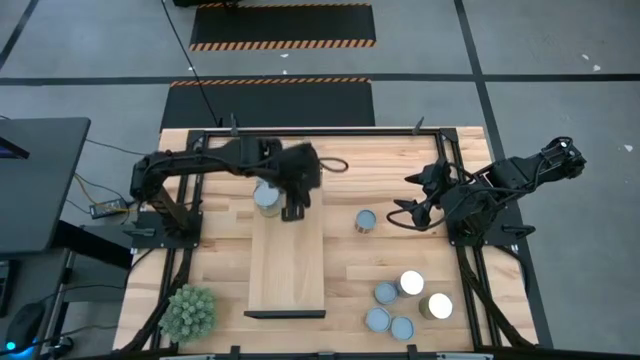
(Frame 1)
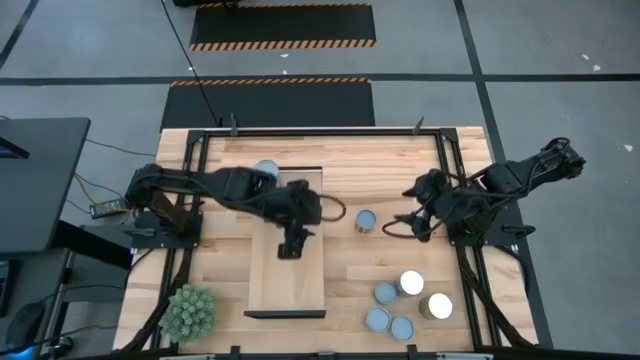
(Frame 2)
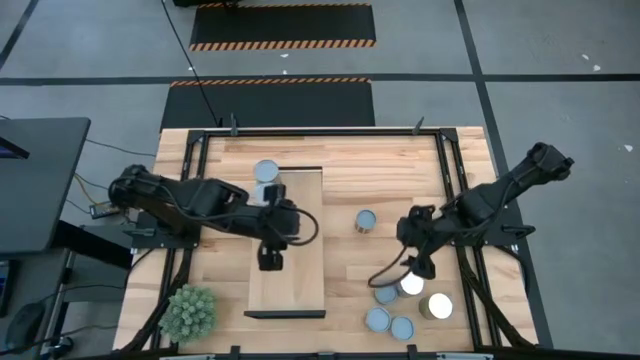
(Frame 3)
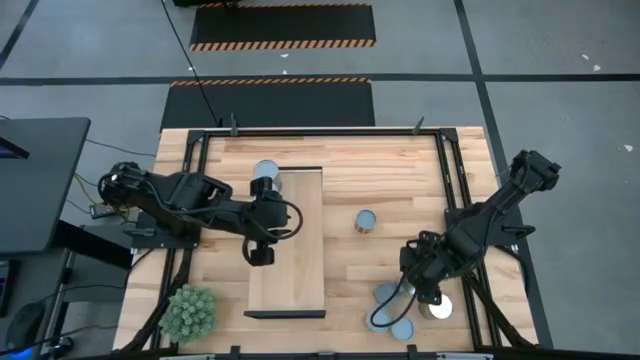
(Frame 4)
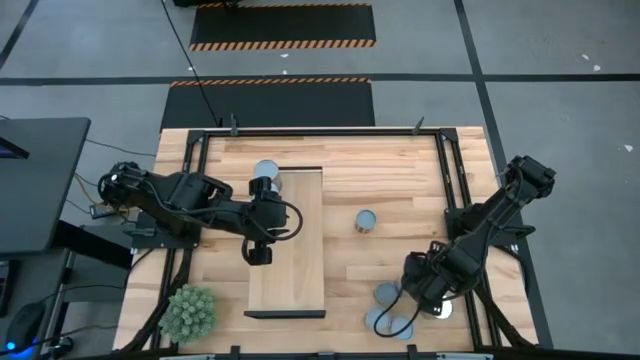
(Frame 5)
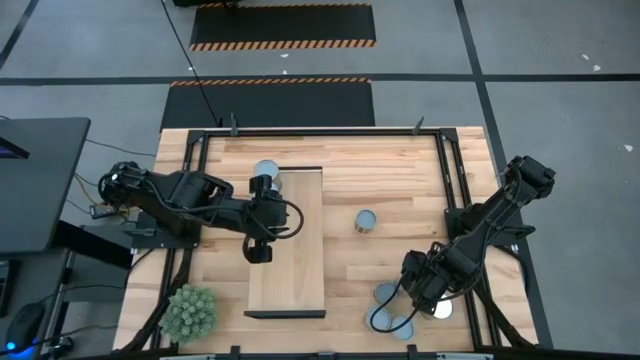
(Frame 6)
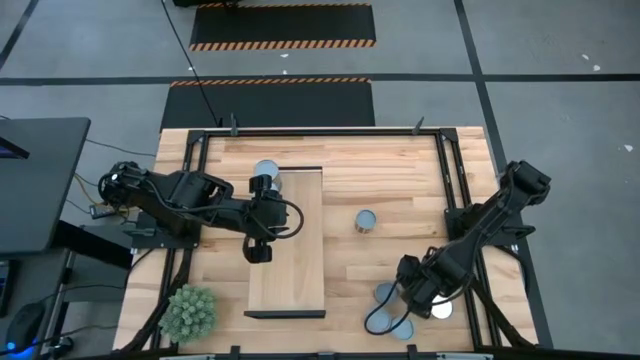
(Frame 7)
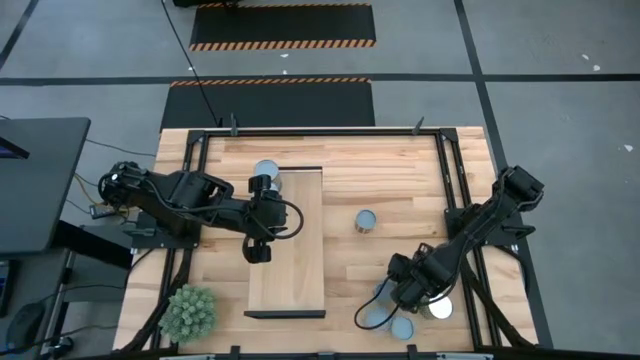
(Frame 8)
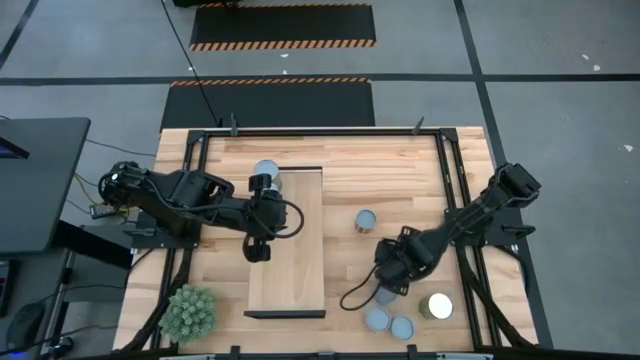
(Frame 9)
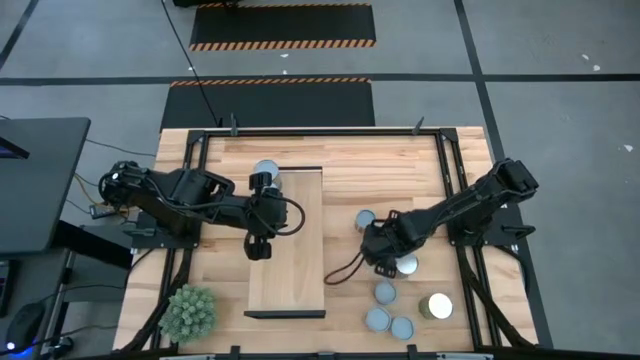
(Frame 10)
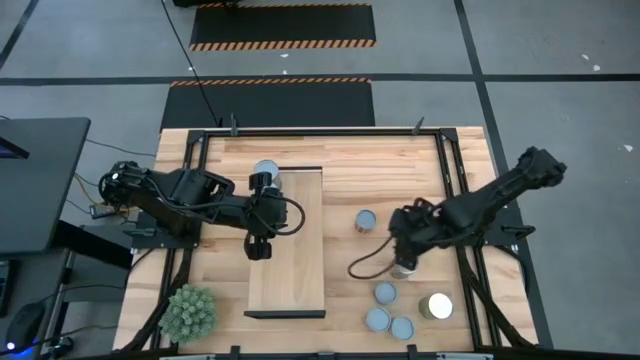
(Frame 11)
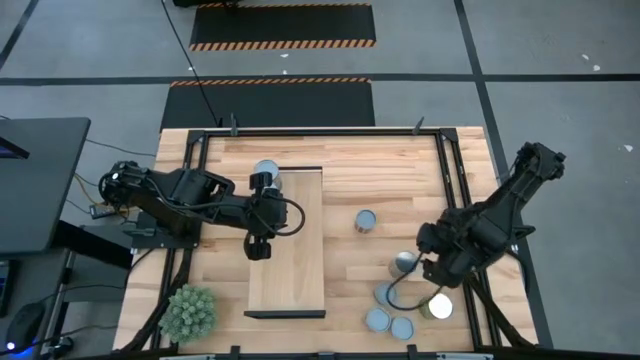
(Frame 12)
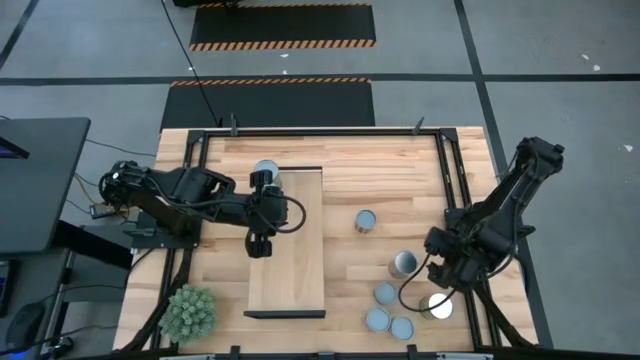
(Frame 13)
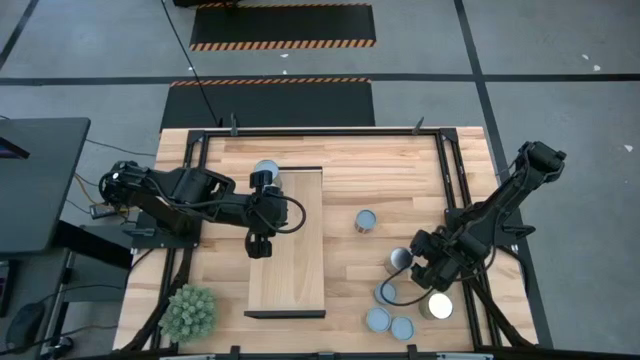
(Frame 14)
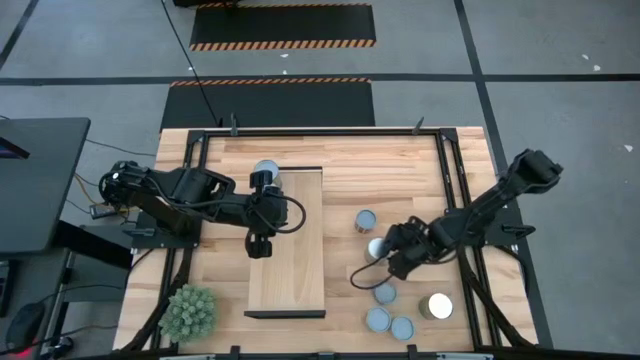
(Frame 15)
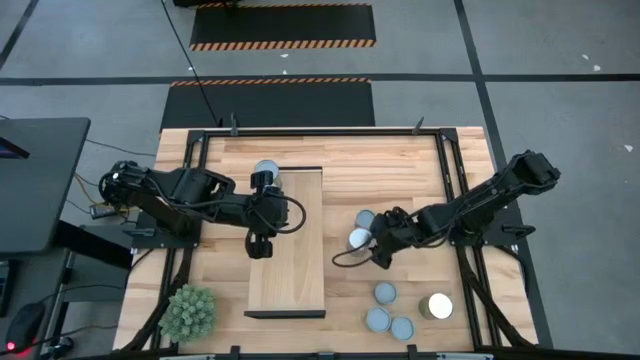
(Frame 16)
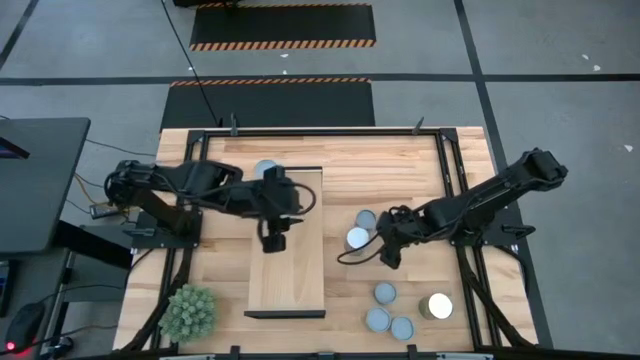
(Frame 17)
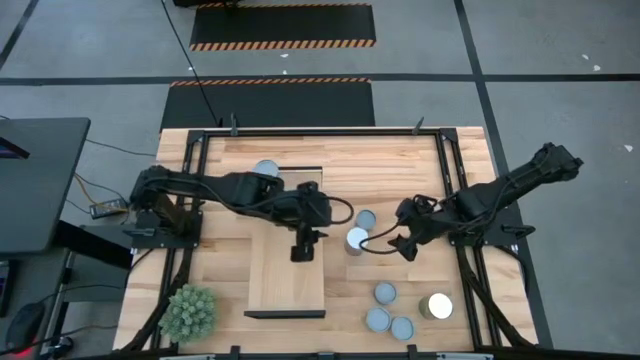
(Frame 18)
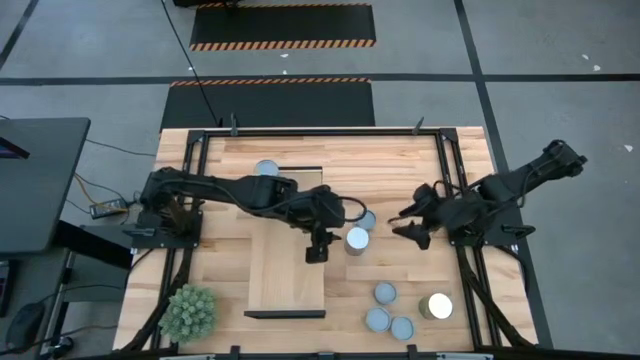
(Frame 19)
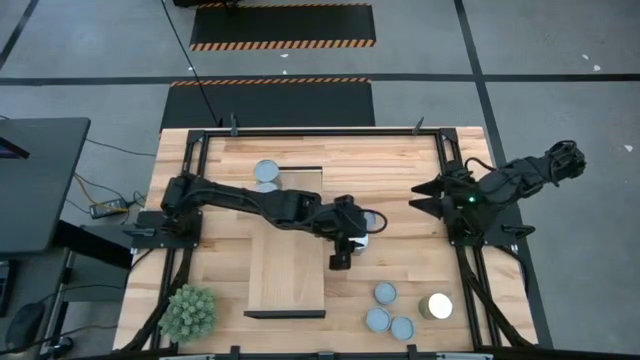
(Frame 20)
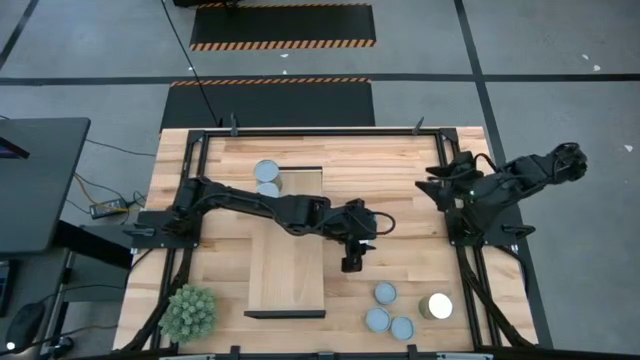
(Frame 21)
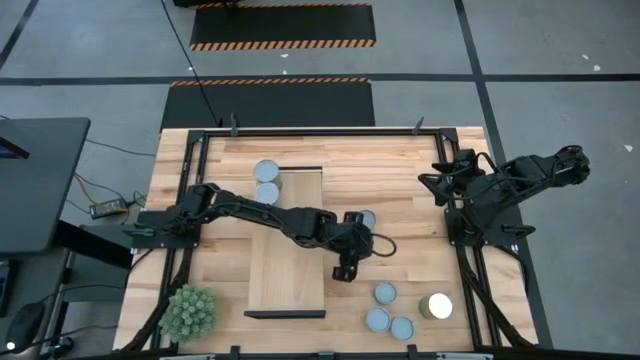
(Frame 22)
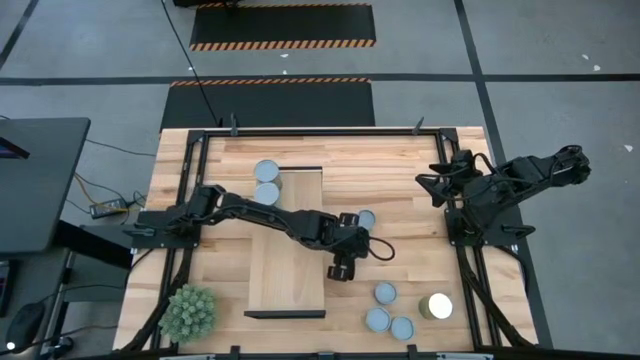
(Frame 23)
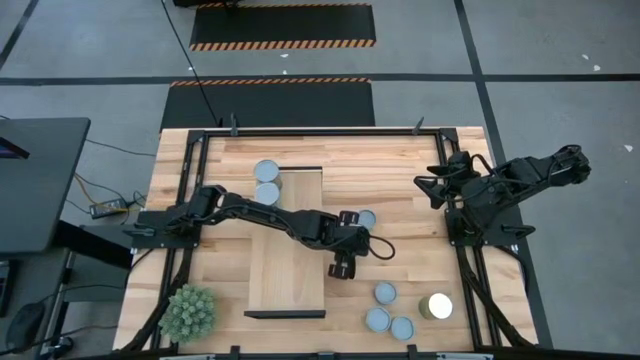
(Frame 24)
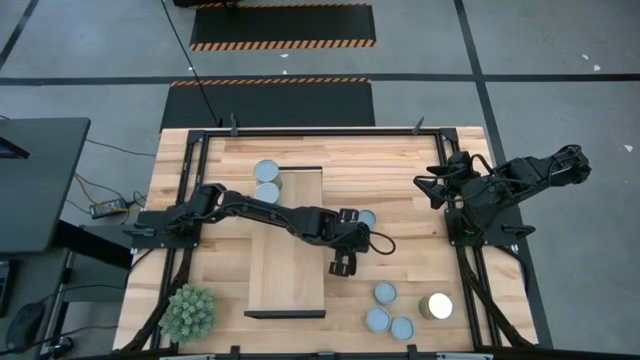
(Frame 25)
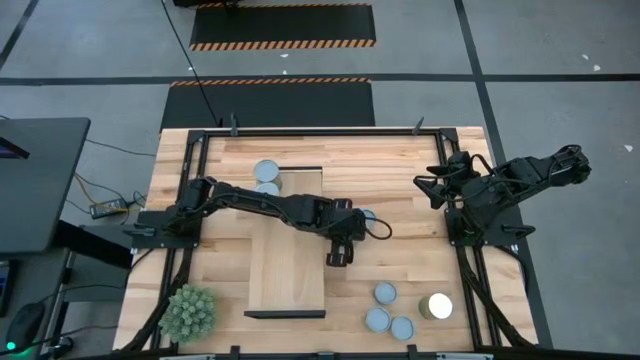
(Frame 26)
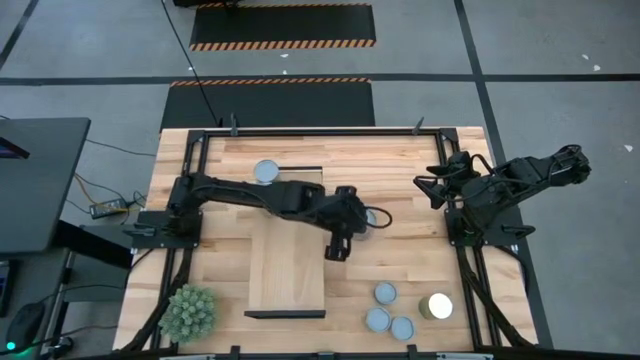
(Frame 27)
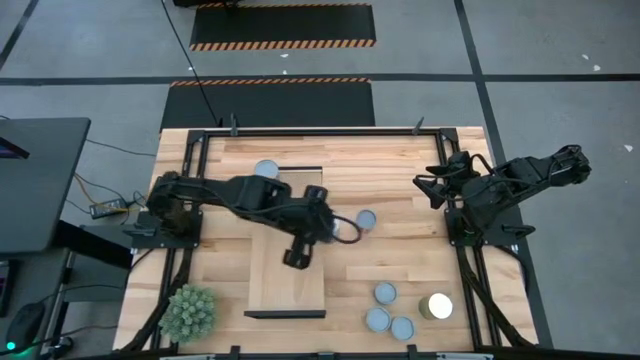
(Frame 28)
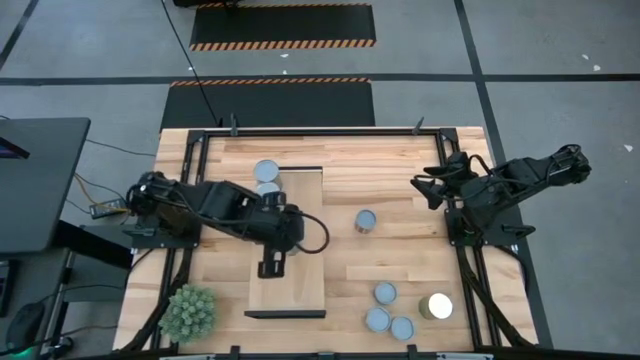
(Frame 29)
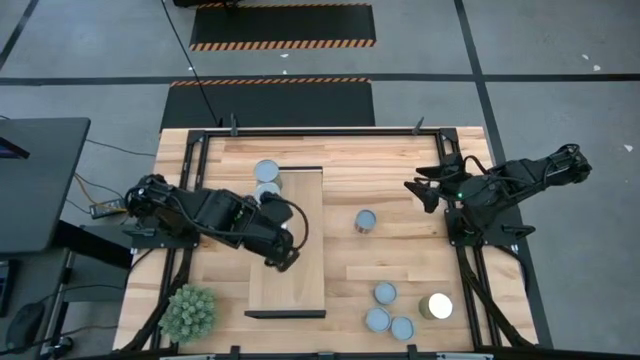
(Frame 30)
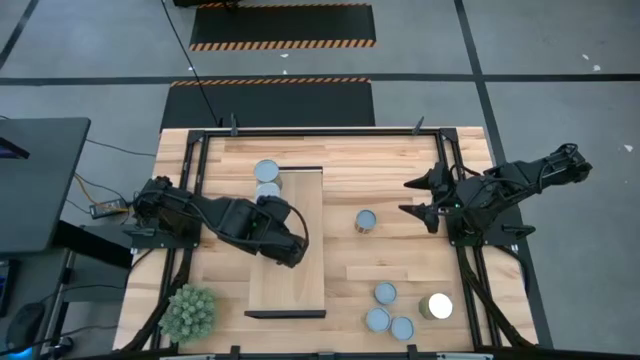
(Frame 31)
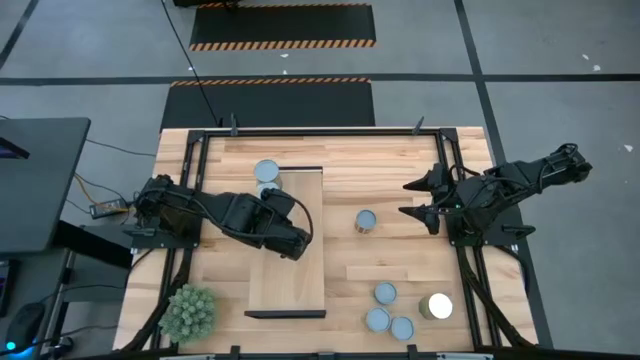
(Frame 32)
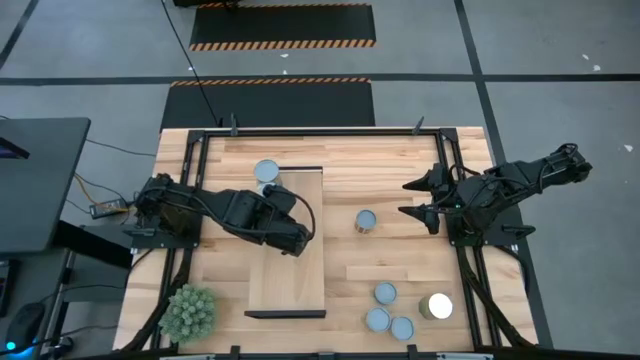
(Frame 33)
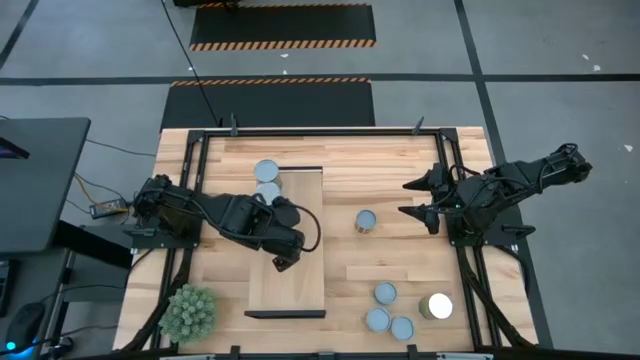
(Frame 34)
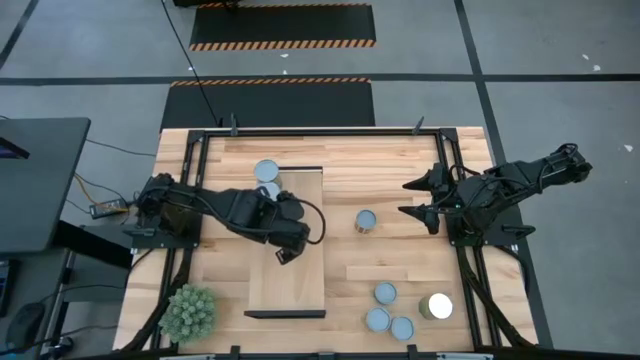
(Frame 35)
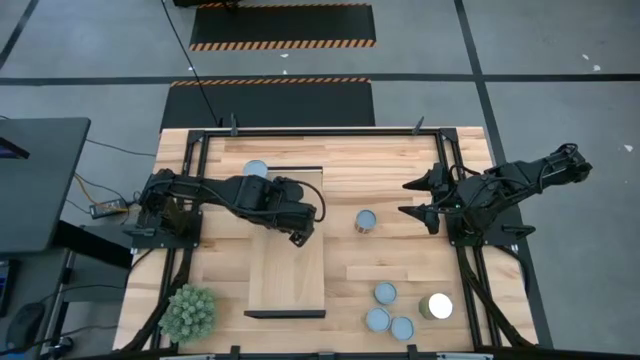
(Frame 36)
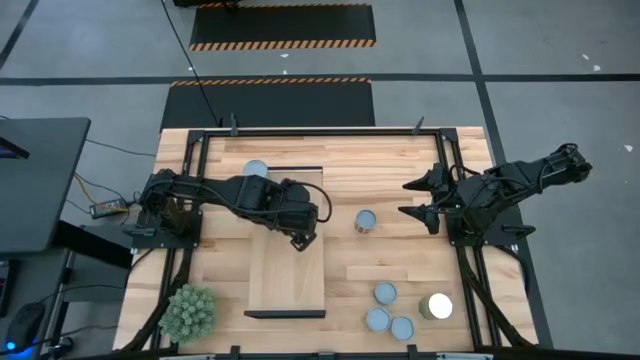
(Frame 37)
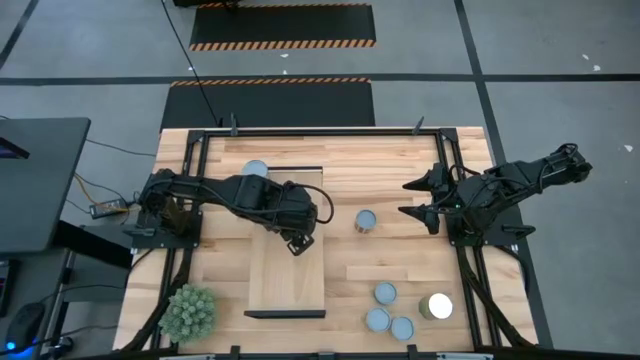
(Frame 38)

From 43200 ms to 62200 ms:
Task: Pick and place cans onto a shelf
Put the canned peaches on the shelf

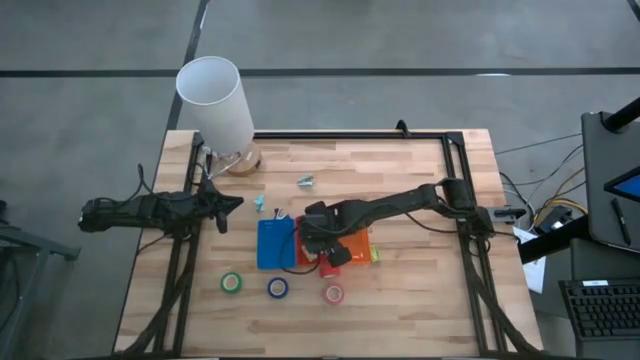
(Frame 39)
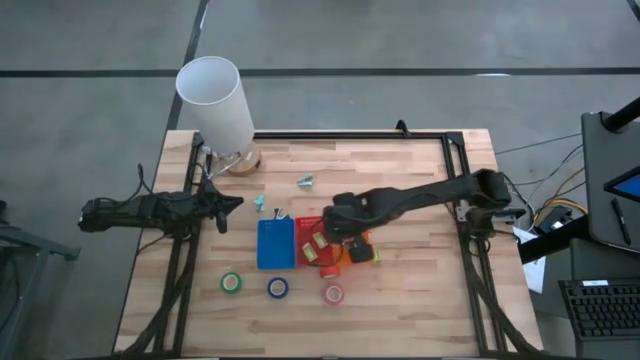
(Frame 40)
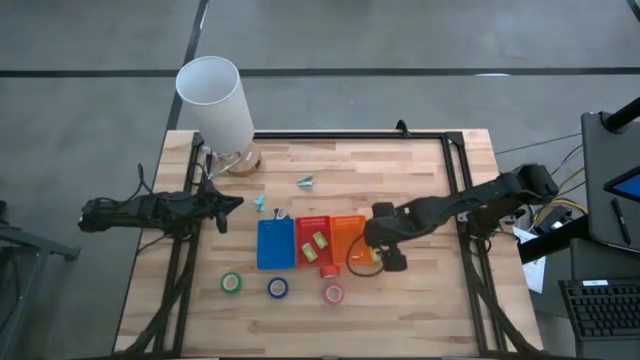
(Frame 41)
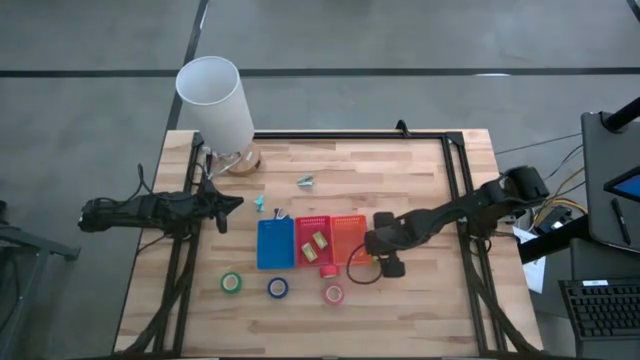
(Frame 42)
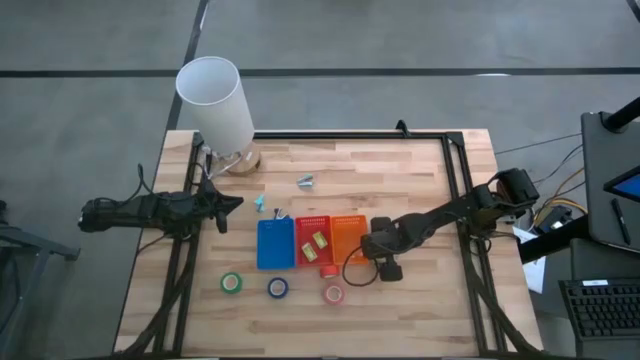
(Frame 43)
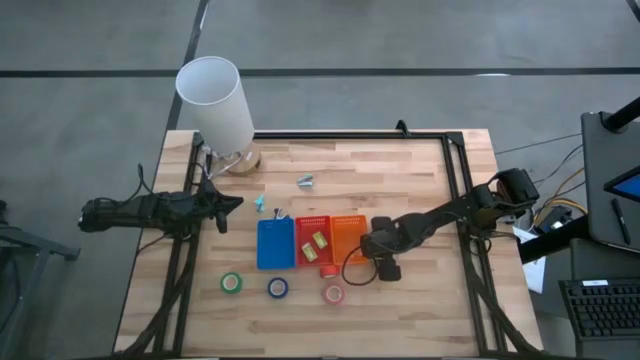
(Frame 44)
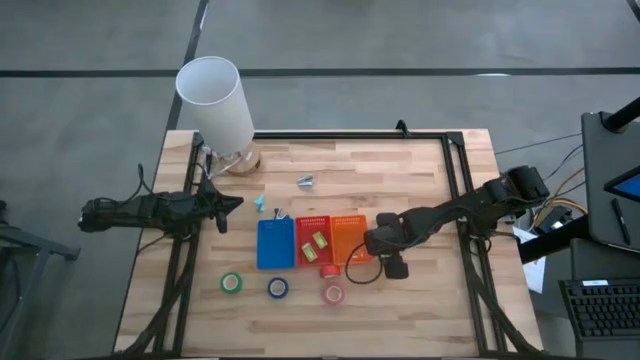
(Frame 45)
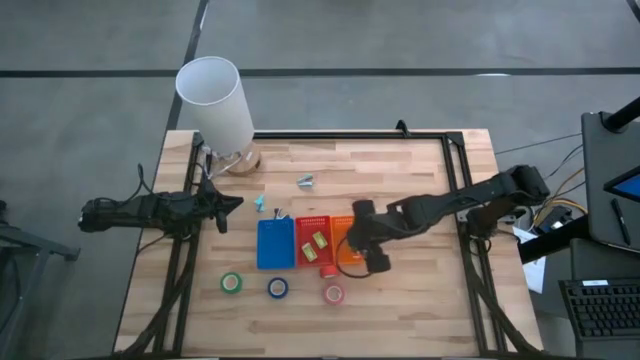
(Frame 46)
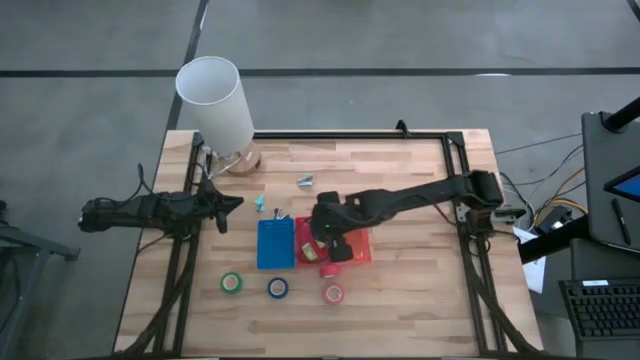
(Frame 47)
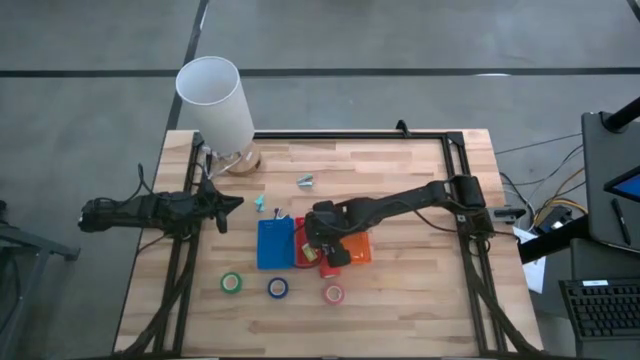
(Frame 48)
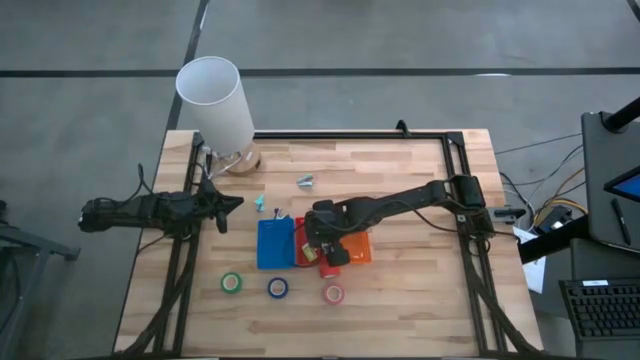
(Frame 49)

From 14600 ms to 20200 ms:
Task: Pick and place Stapler, Stapler remover, tape
Put the green staple box into the red bin
